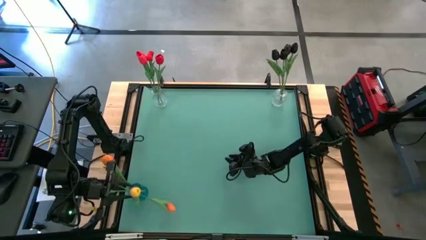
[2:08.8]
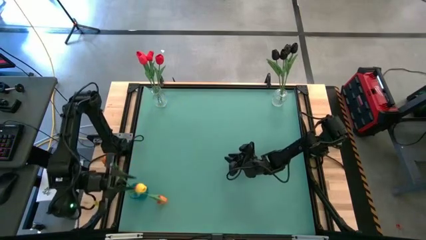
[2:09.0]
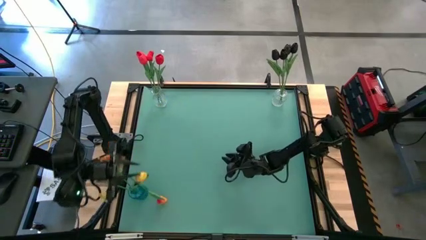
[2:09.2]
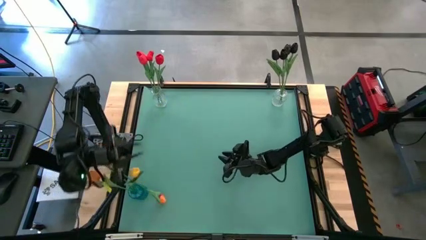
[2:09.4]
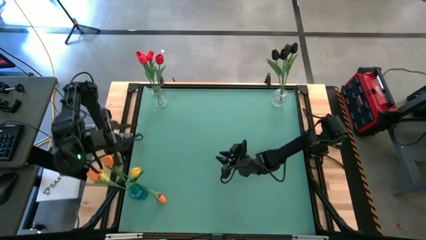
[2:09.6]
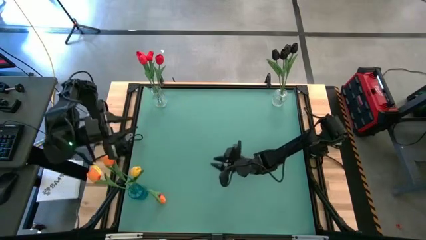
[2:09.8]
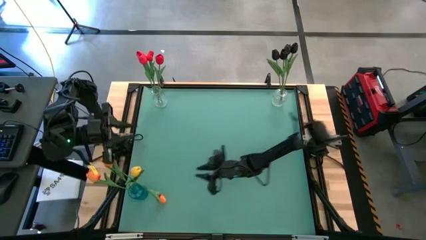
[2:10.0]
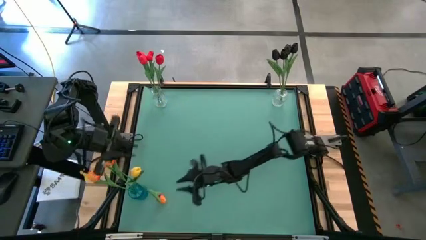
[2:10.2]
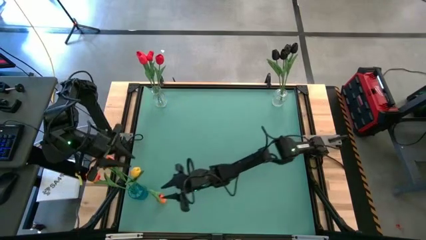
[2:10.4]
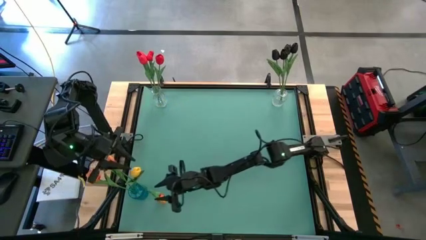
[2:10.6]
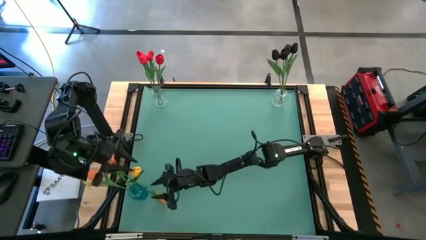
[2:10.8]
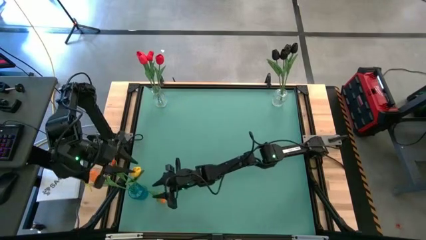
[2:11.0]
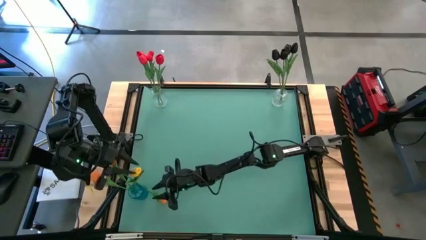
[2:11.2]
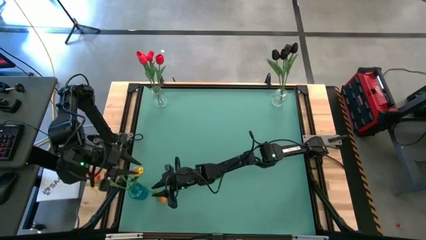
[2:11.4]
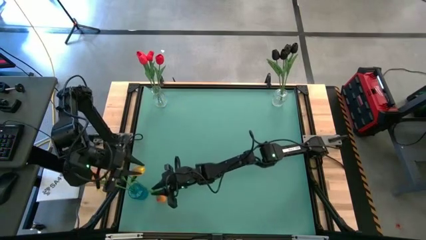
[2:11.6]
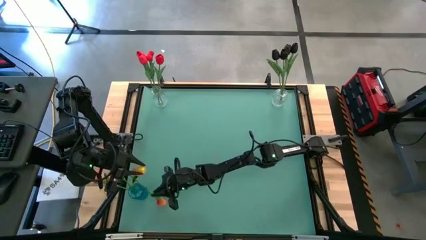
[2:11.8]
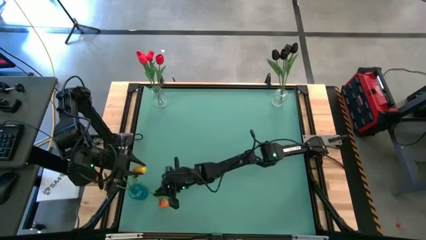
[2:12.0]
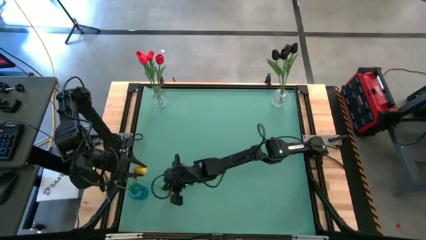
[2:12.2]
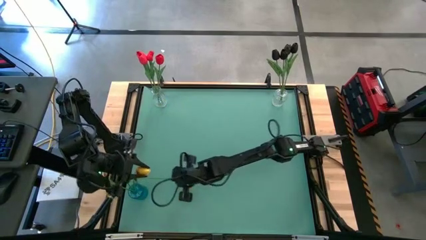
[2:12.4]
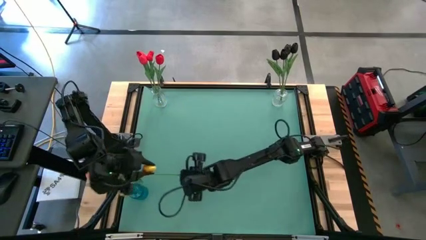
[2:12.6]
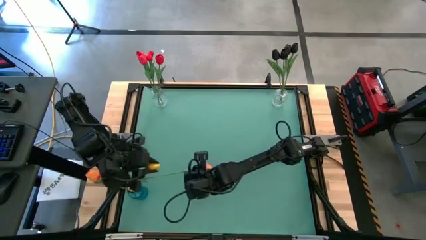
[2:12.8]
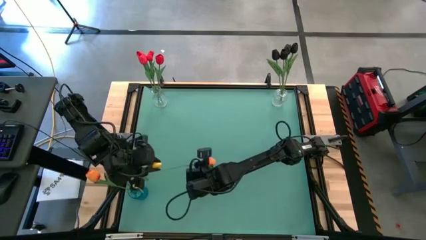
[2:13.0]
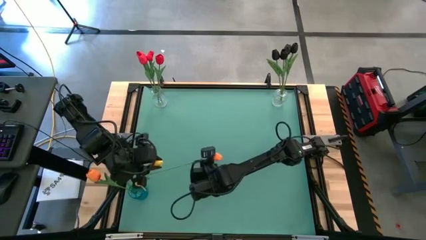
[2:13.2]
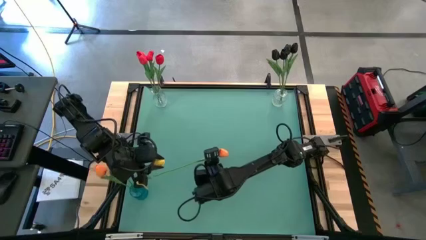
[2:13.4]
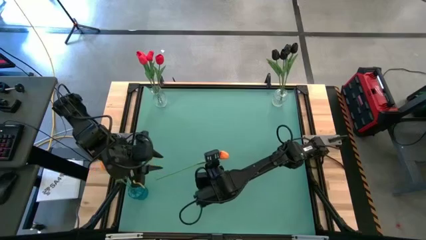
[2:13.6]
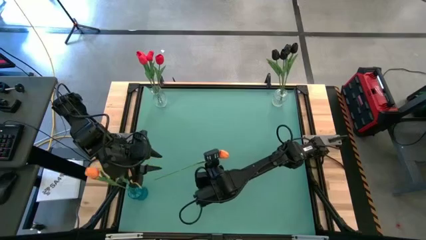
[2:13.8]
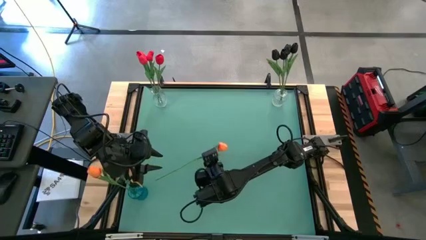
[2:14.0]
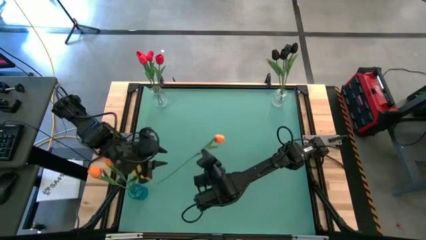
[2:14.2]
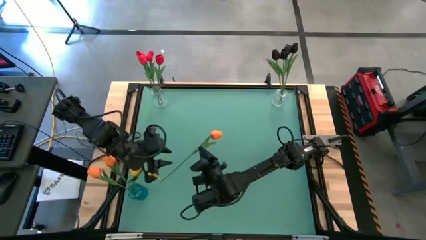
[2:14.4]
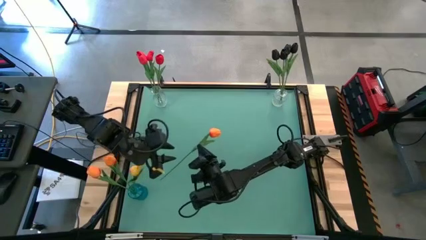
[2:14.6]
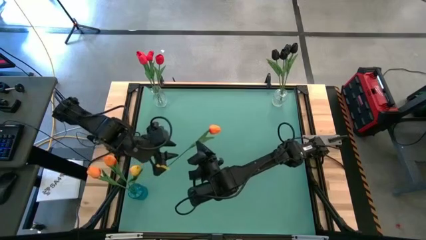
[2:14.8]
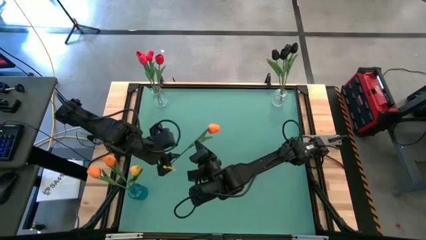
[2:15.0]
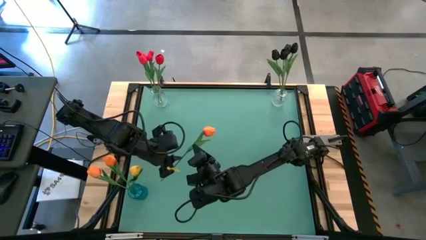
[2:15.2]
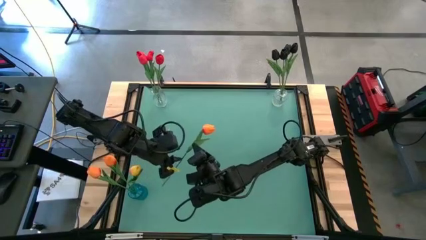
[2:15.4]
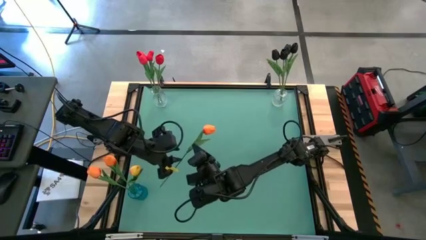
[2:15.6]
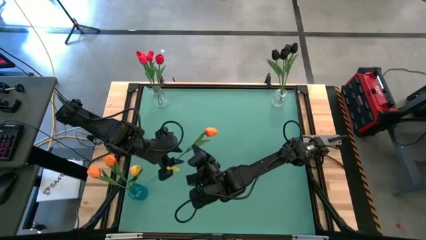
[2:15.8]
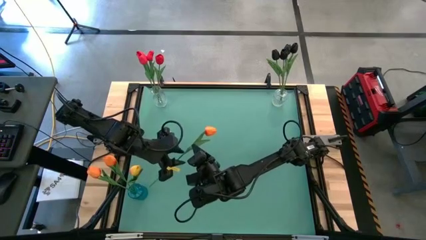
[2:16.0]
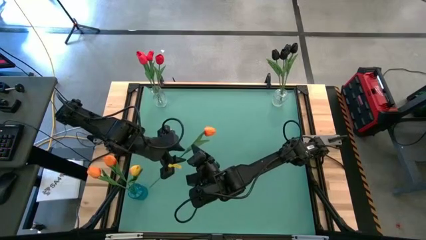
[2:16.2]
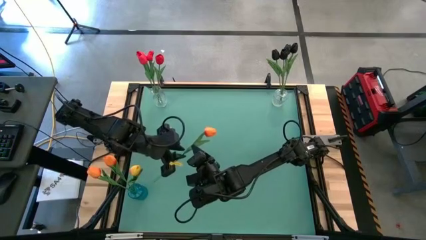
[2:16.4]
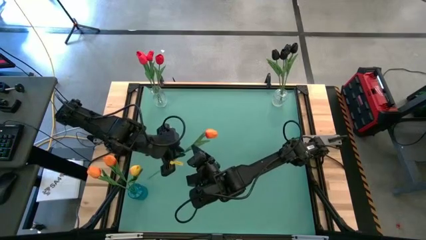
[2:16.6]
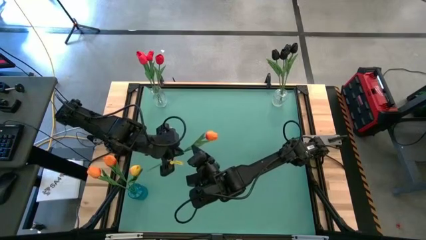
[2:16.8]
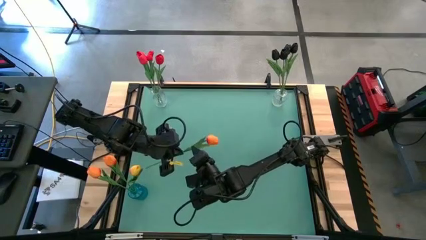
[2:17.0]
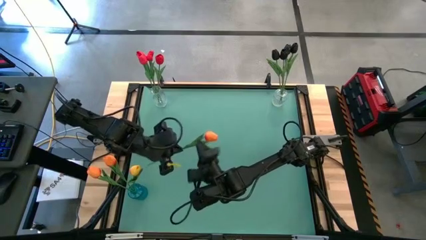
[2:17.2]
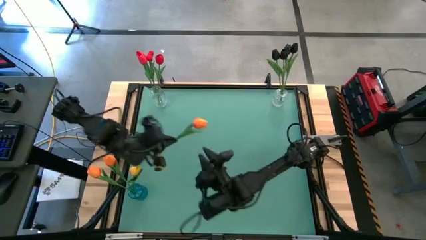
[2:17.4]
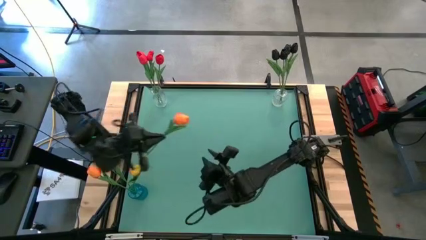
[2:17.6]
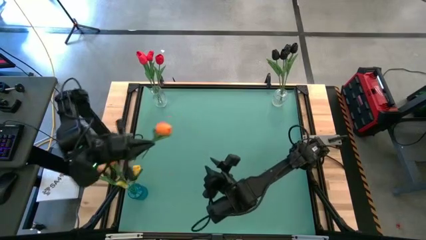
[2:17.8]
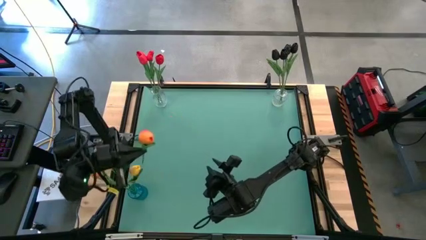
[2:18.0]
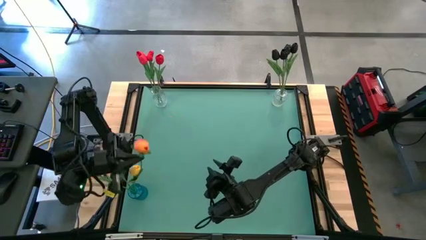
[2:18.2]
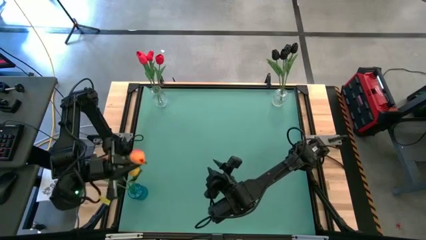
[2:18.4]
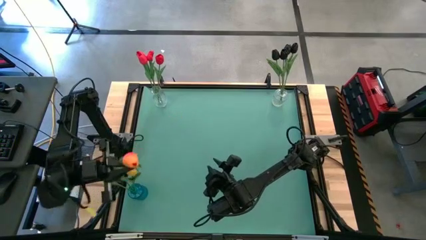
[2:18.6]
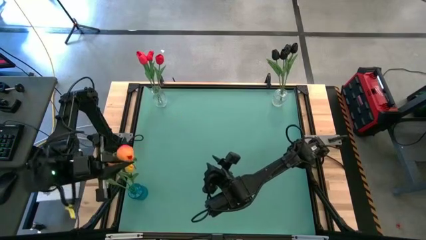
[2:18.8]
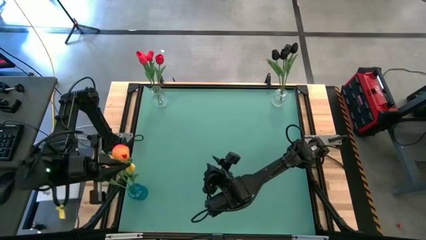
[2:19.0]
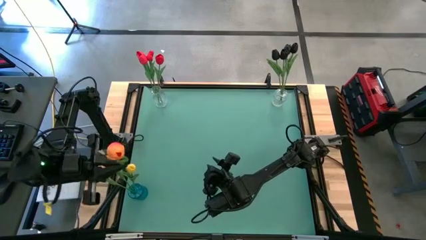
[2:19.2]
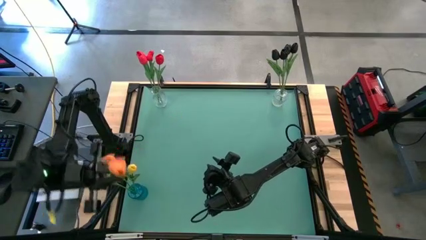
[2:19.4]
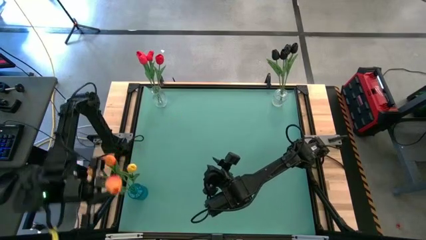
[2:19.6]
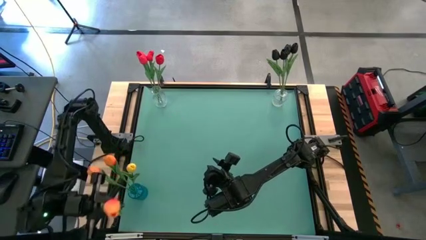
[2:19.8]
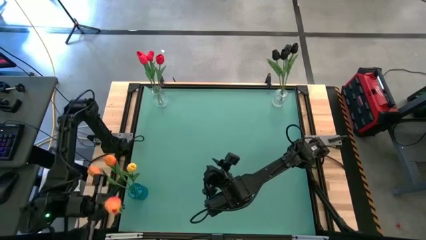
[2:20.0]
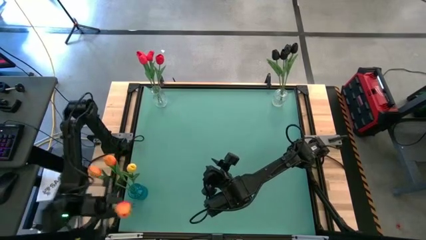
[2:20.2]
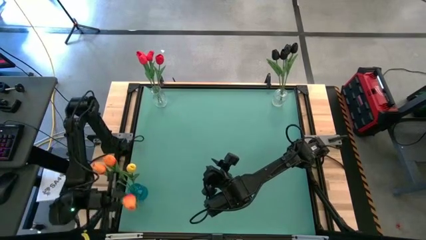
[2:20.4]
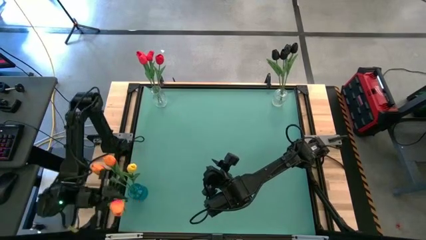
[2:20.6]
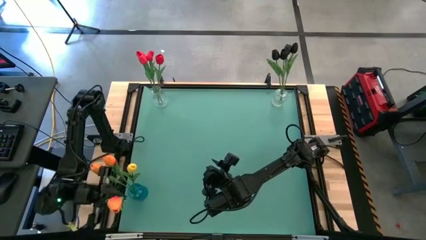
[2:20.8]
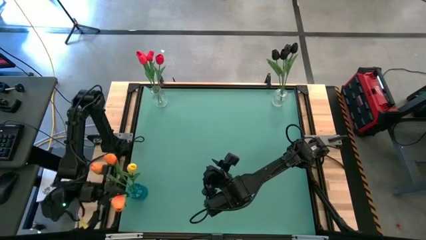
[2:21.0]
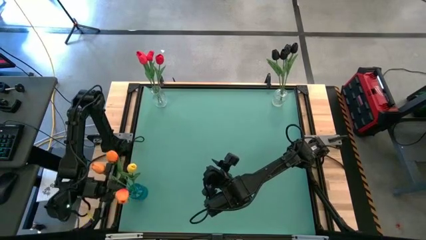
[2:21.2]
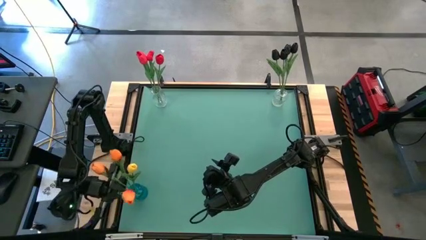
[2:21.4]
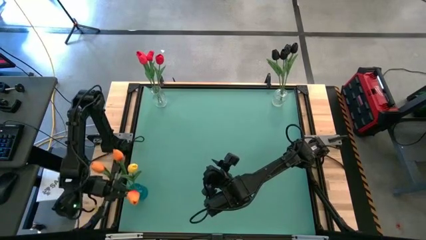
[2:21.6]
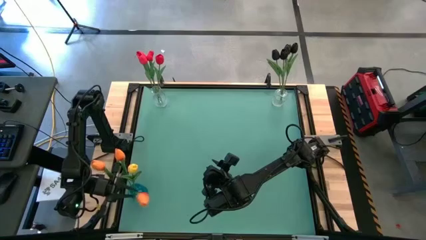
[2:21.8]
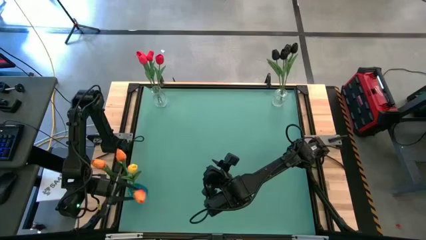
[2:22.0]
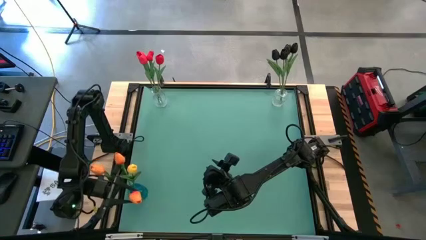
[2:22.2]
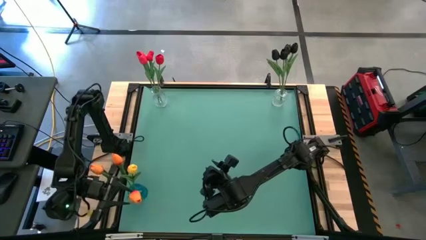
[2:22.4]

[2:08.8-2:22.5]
Task: Sort flowers into vase by color
Put the orange tulip into the blue vase

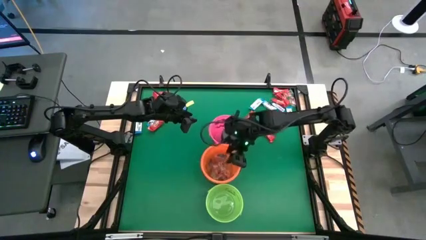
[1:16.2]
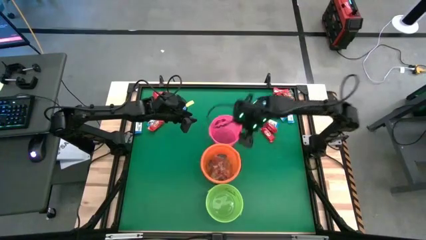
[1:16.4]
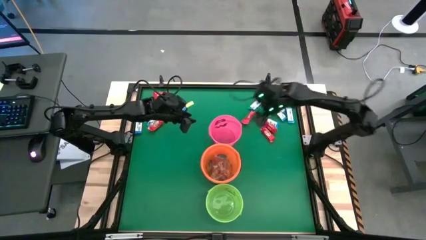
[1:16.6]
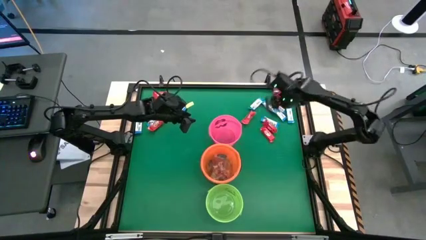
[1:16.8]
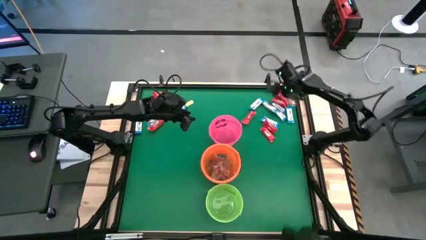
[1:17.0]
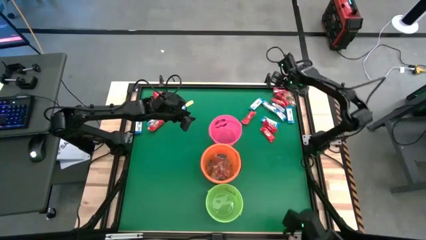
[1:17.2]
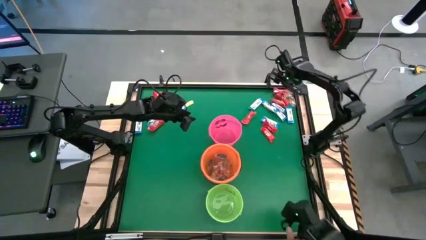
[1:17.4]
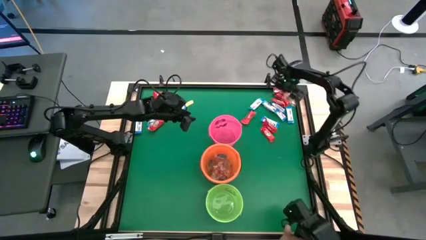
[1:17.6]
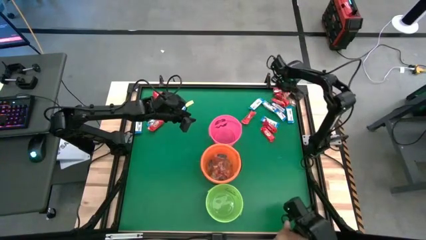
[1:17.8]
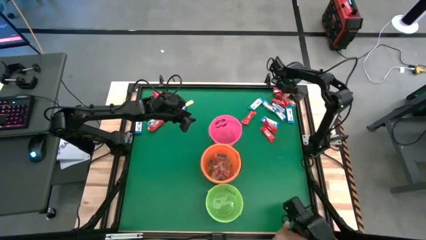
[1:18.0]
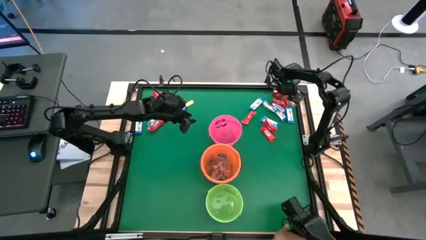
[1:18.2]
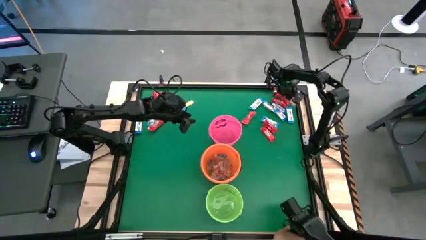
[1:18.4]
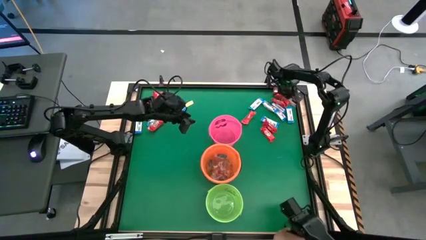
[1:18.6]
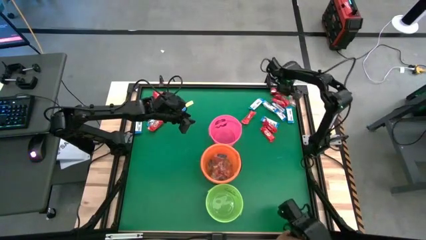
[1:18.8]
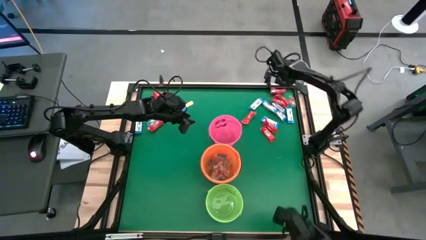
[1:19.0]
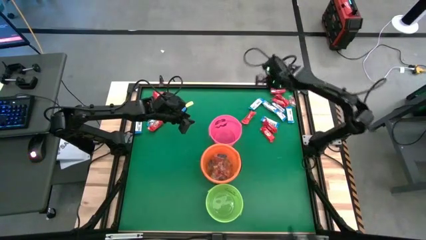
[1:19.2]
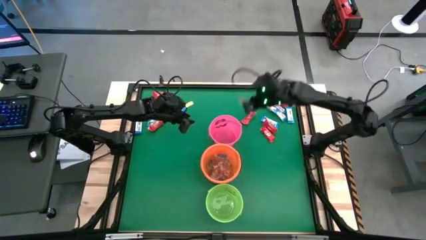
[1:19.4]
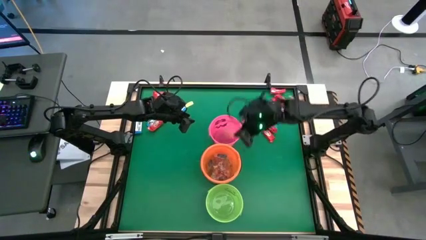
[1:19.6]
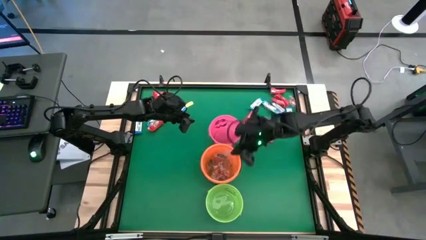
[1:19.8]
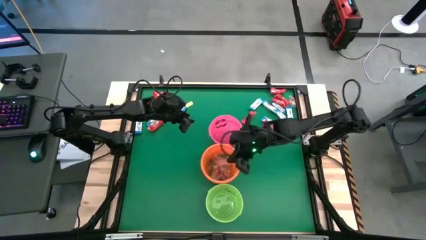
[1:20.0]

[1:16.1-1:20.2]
Task: Sort candy by brand, put in halloween buckets
Put the orange gummy into the orange bucket
